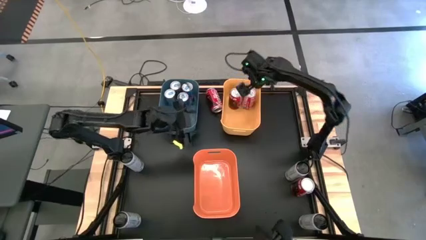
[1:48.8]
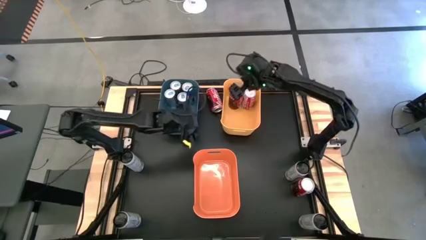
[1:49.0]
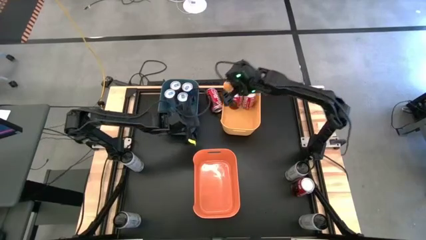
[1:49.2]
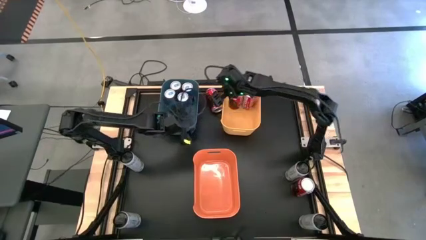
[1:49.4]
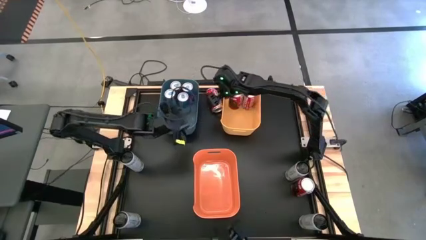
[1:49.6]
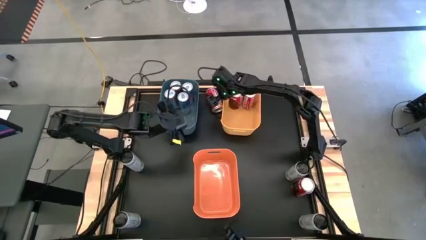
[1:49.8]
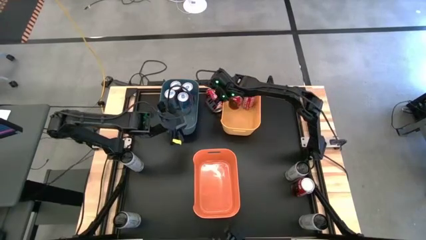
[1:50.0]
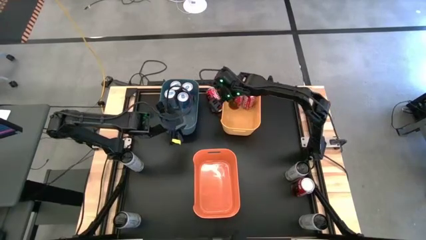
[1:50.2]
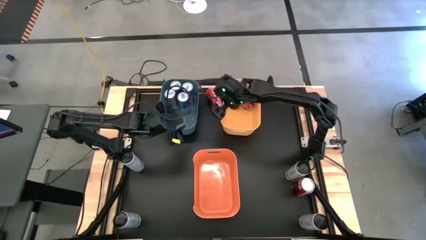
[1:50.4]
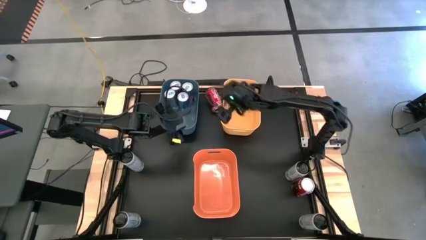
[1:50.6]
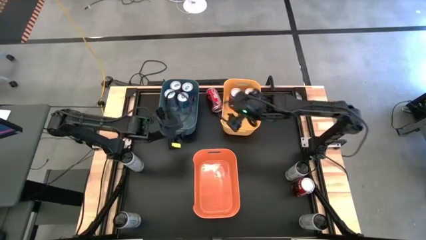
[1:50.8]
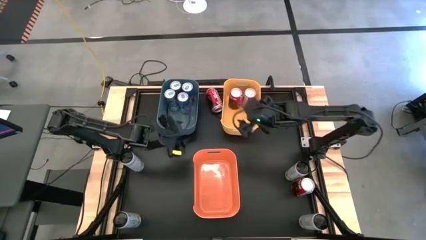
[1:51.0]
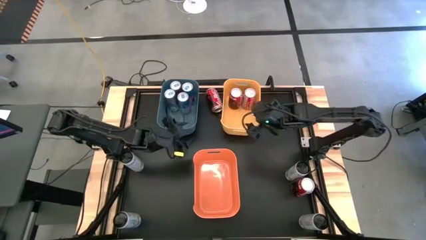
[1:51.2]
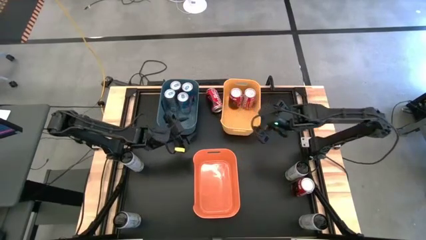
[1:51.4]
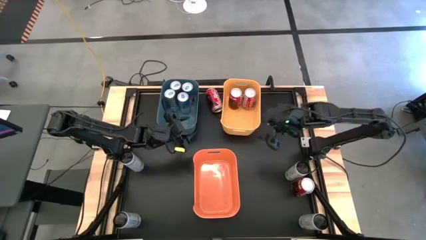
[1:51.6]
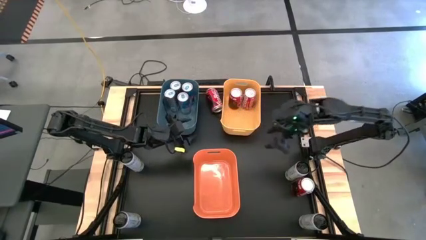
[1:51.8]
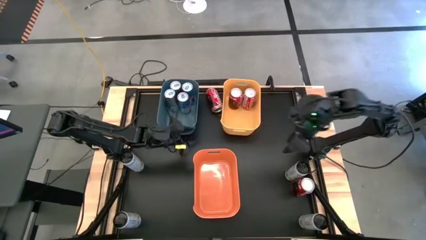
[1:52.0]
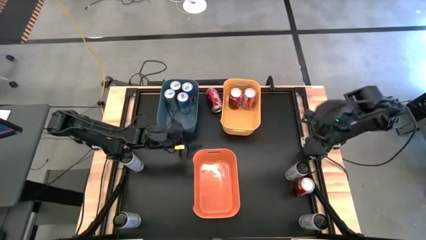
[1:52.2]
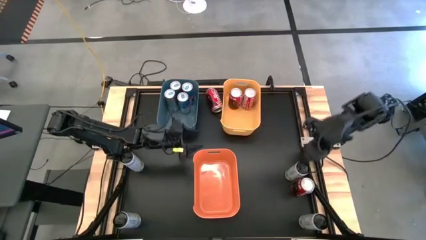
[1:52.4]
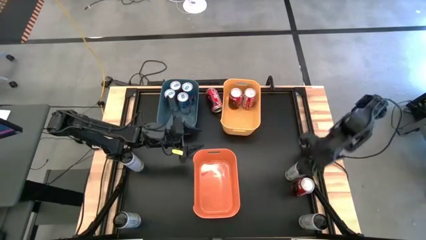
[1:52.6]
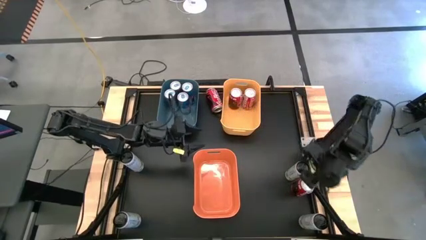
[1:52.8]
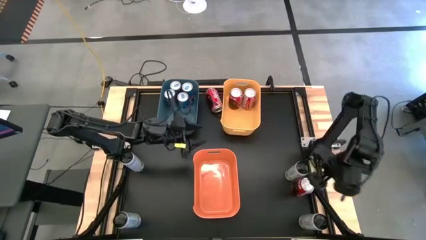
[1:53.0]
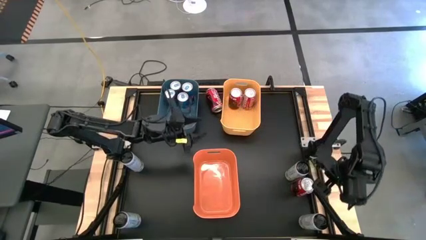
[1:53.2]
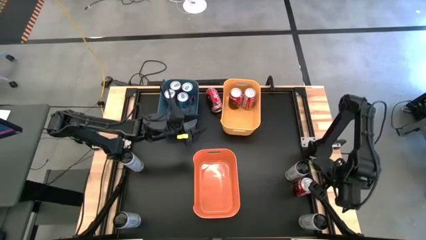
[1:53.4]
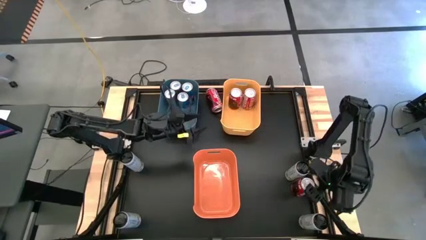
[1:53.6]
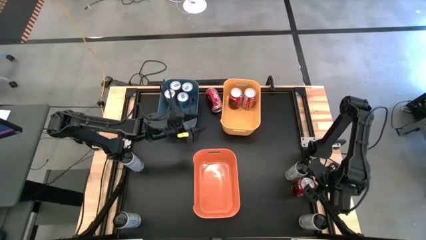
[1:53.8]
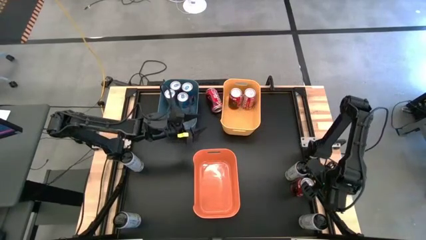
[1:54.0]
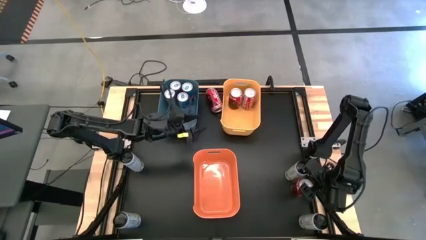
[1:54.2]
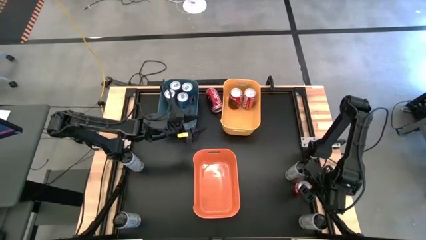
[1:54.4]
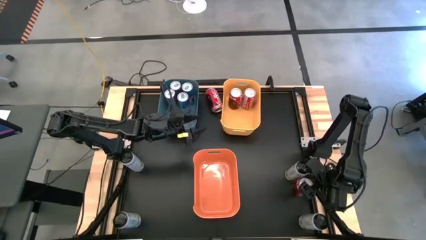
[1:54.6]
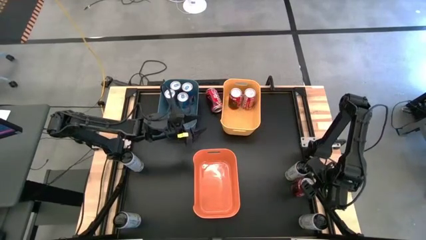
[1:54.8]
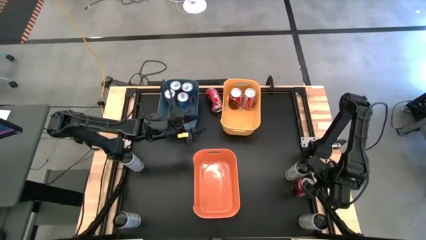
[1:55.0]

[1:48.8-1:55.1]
Task: Sort soda cans
Put the bottom red soda can into the yellow bin

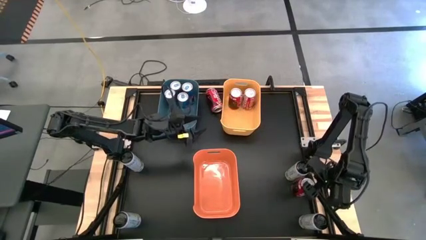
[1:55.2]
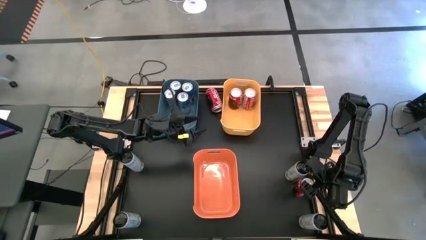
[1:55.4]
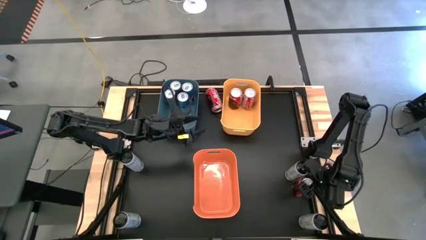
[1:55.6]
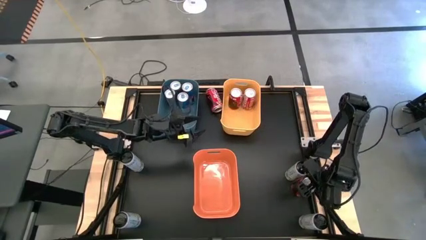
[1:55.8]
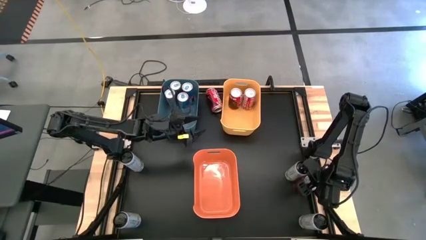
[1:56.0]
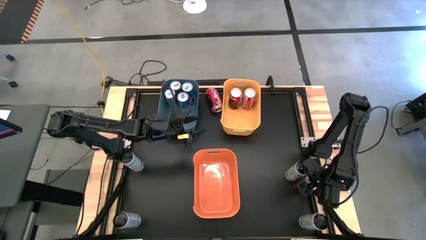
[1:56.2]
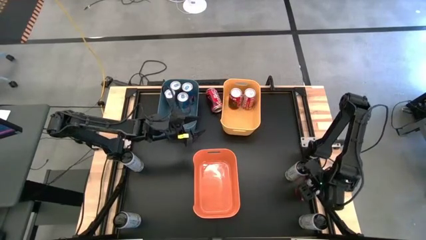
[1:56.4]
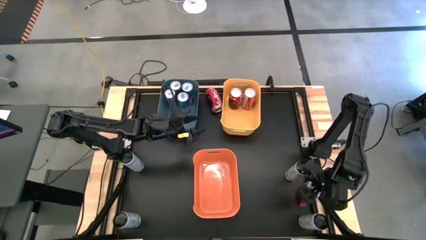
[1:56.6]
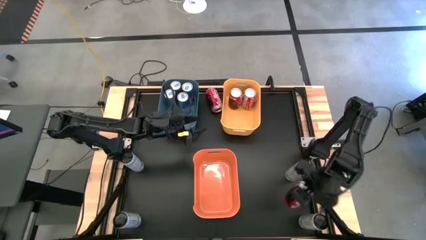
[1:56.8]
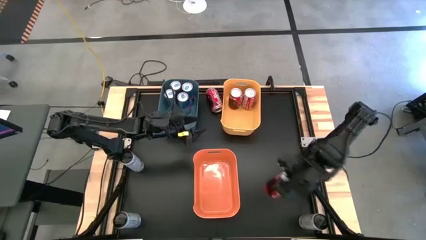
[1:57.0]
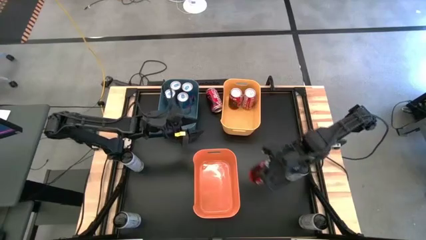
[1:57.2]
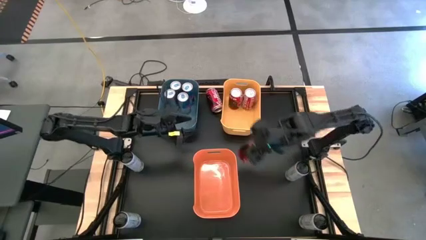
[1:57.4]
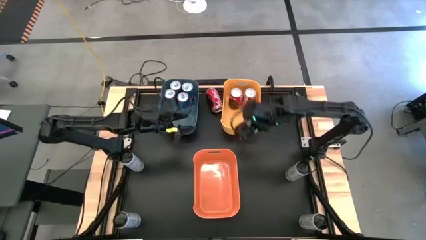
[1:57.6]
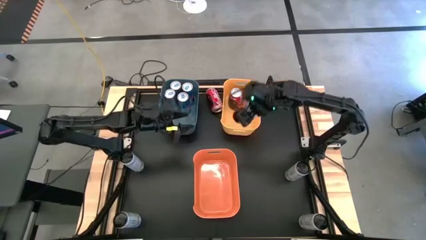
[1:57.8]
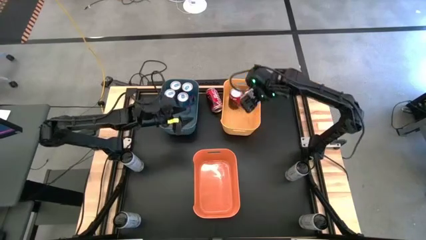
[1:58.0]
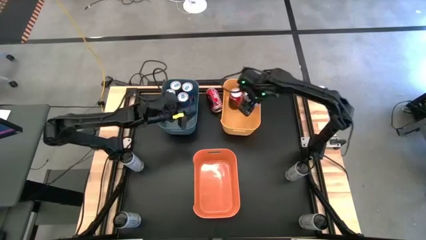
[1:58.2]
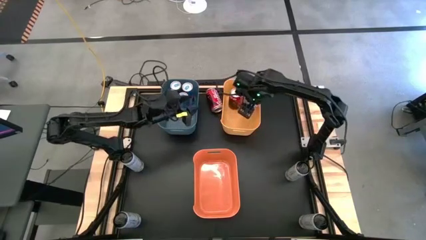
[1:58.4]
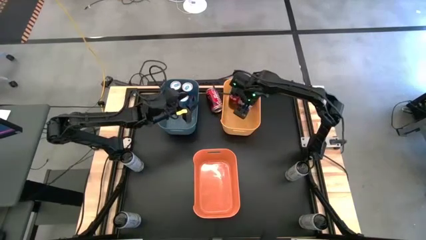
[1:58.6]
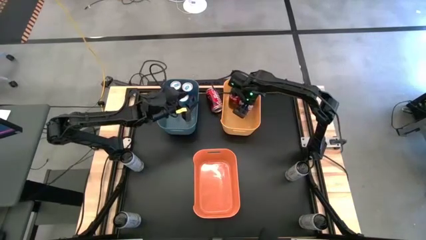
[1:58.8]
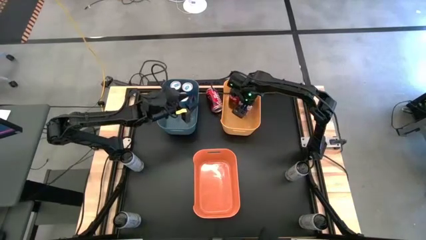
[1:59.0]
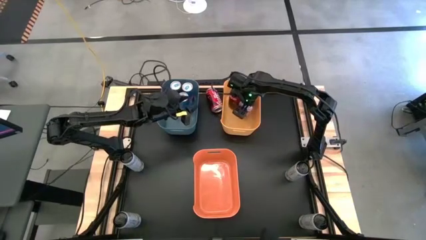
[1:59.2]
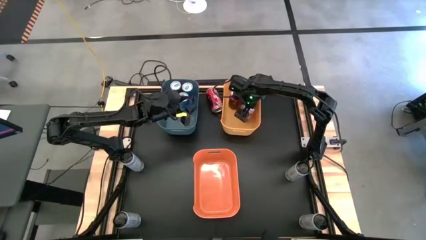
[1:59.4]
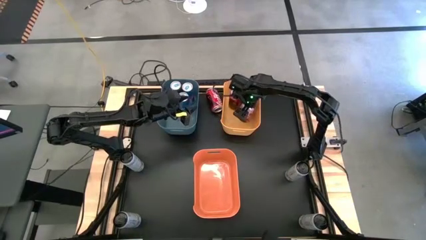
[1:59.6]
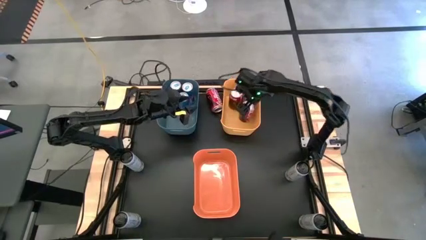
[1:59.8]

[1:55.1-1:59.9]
Put the bottom red soda can into the yellow bin

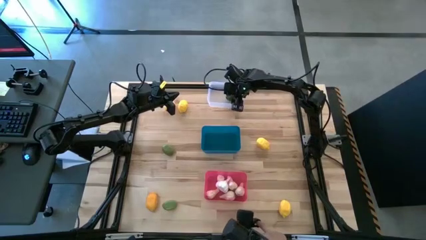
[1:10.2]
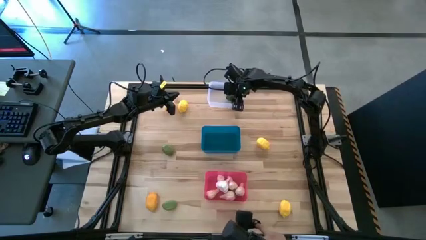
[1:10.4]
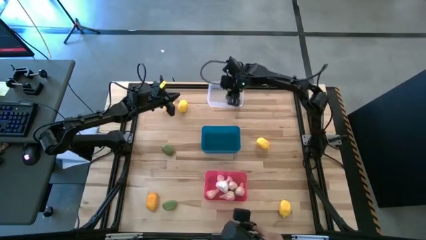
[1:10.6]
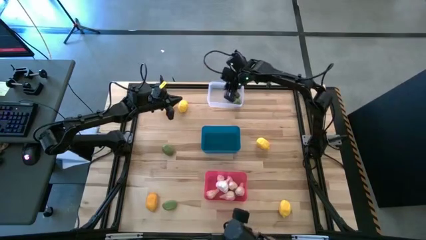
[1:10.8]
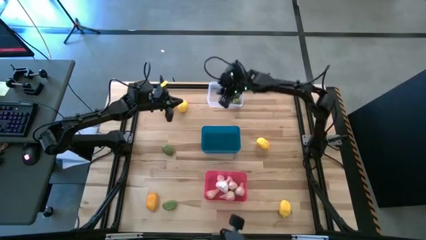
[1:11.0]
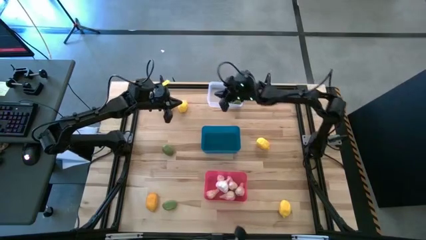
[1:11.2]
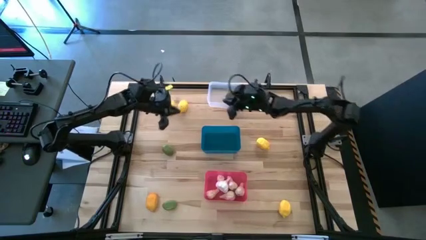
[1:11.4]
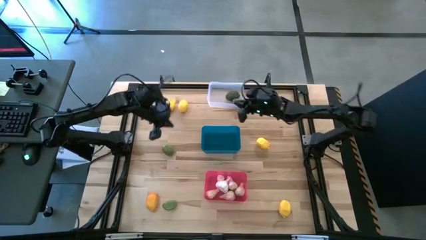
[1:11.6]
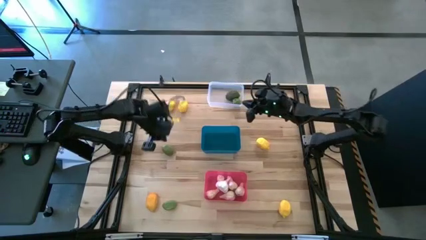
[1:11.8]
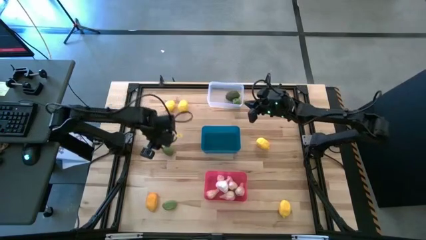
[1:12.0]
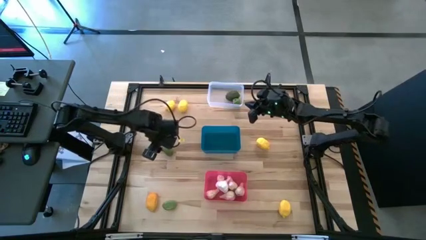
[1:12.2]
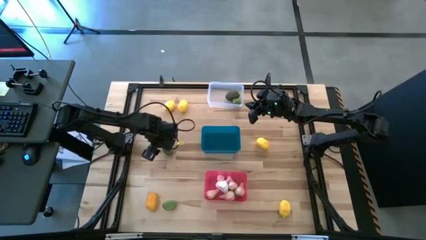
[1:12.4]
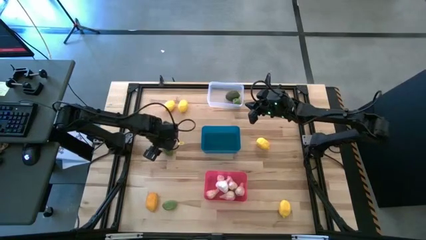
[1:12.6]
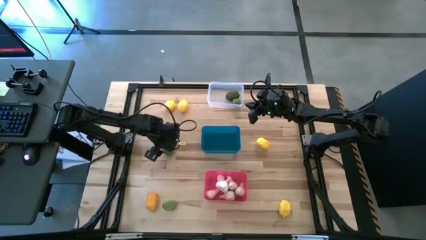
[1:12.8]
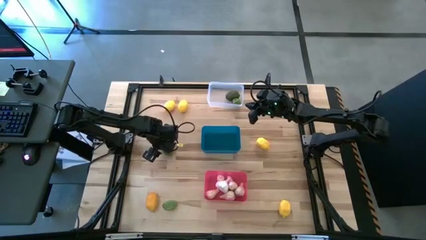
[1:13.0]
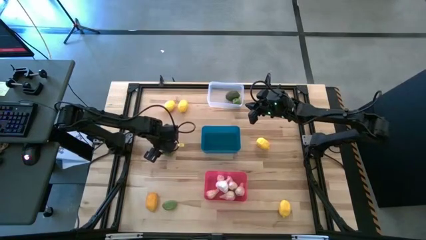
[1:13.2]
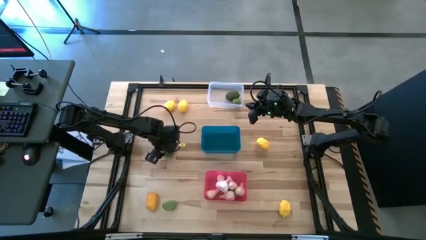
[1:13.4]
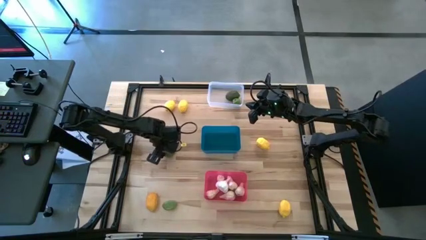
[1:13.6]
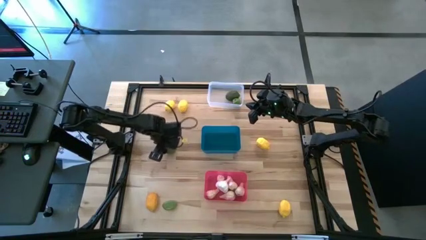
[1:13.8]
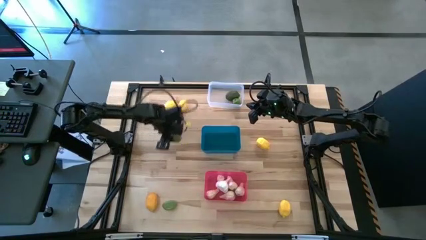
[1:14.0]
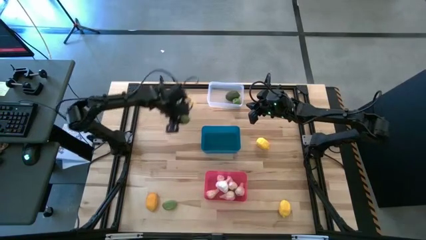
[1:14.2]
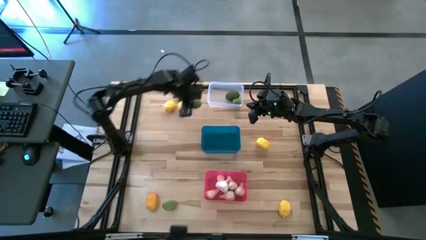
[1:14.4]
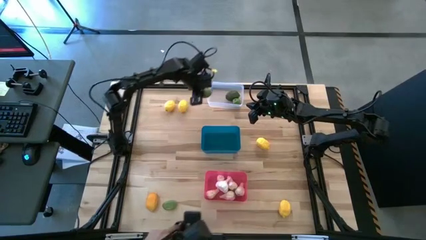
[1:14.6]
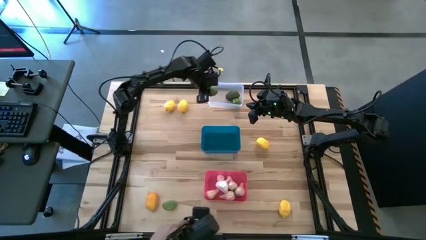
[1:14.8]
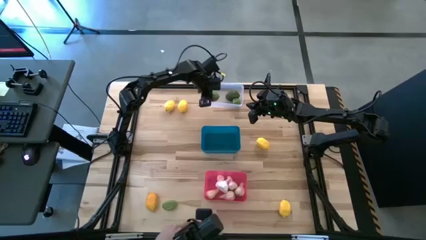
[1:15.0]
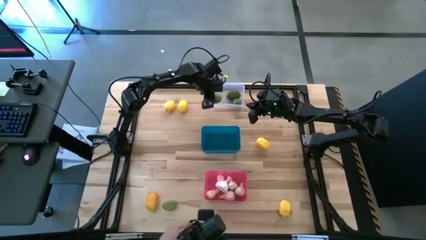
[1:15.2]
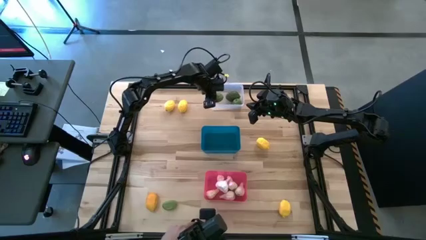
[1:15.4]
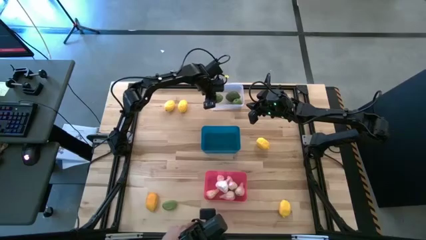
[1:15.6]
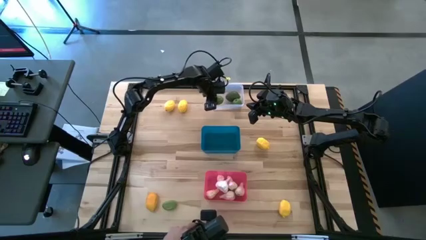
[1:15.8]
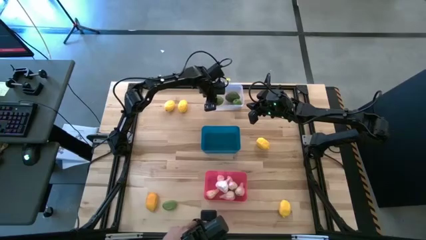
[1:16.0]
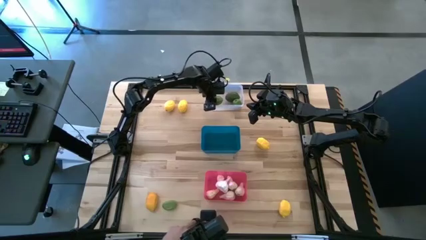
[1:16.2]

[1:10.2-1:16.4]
Task: Sort produce into baskets
Put the top green lime into the transparent bin
